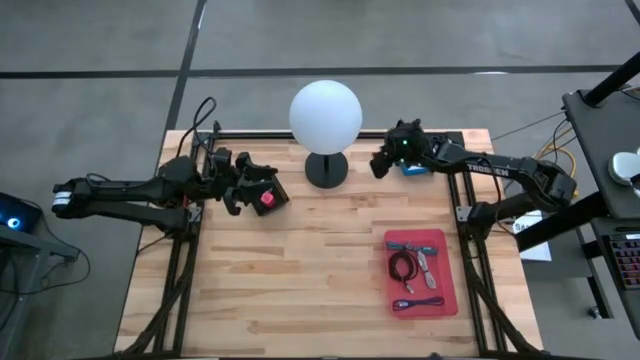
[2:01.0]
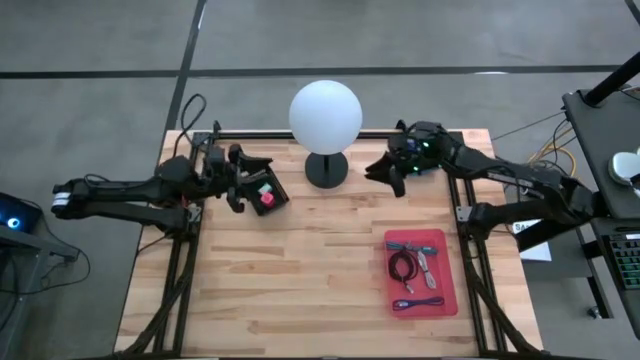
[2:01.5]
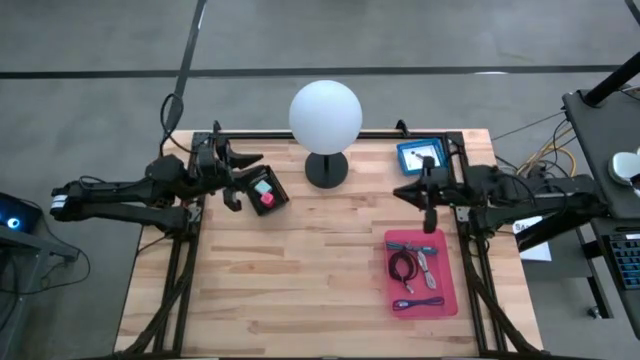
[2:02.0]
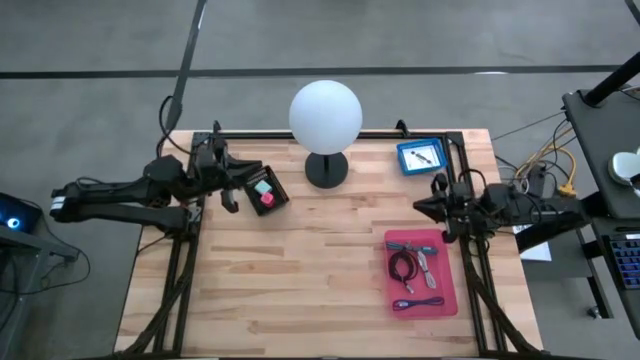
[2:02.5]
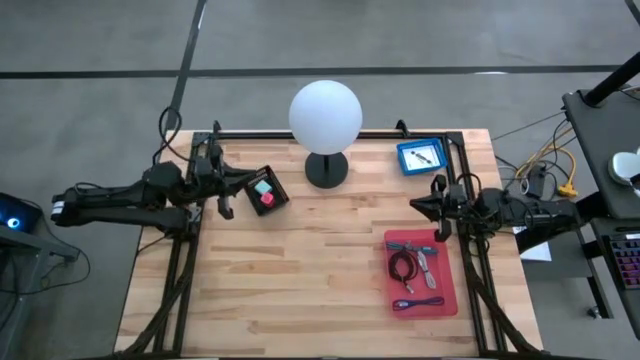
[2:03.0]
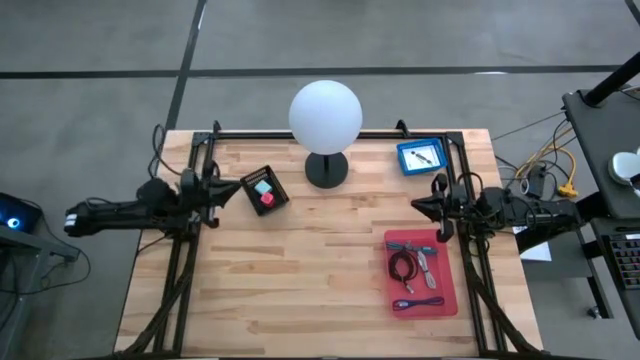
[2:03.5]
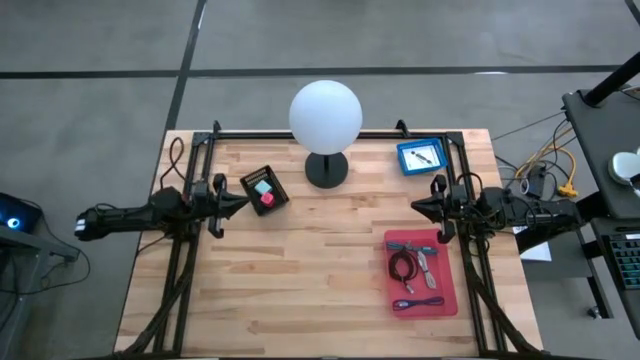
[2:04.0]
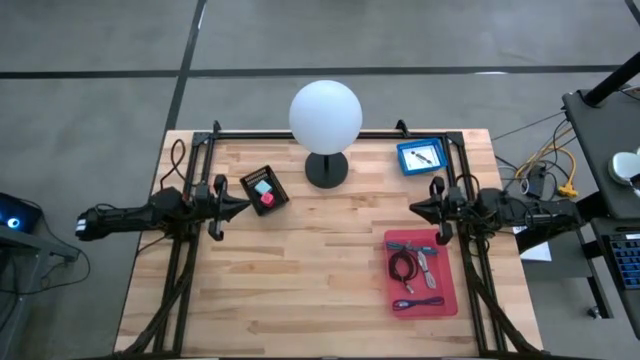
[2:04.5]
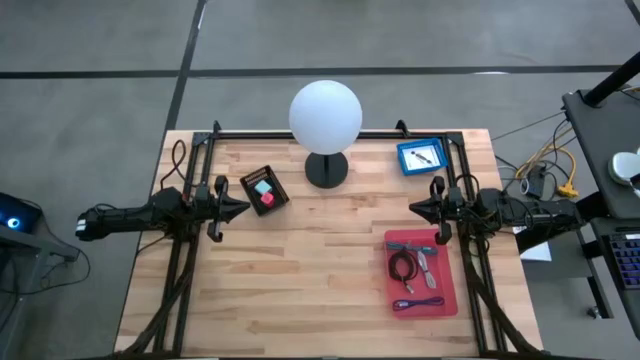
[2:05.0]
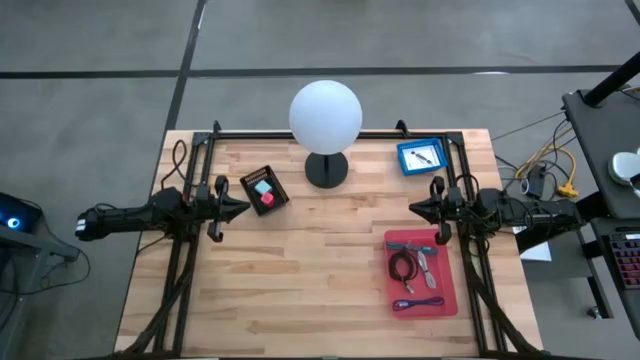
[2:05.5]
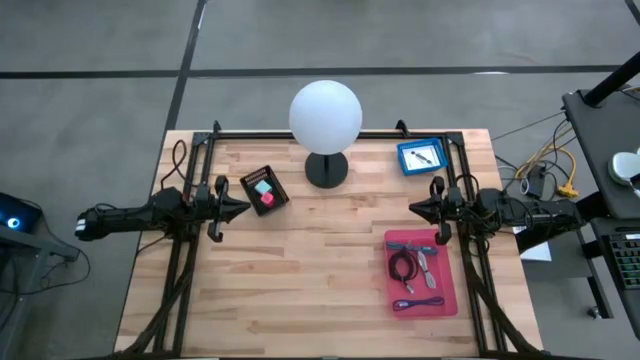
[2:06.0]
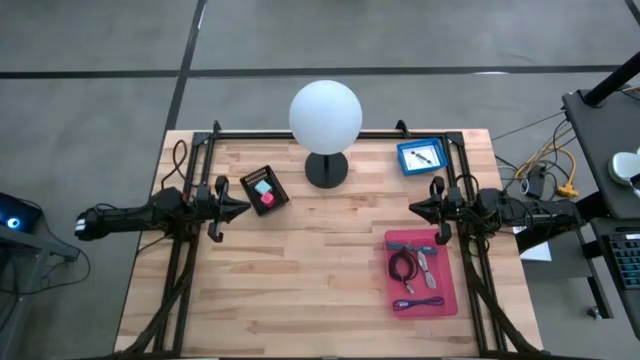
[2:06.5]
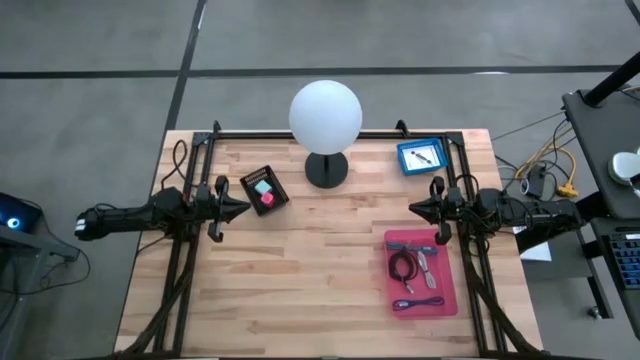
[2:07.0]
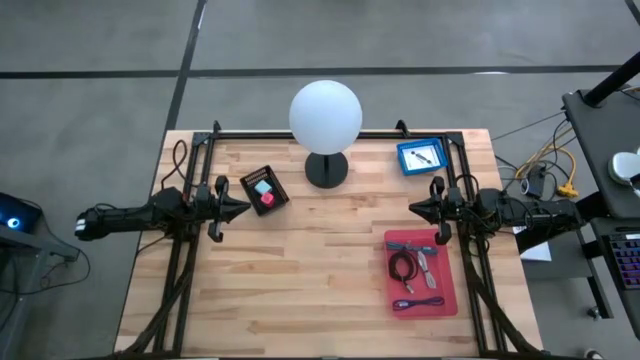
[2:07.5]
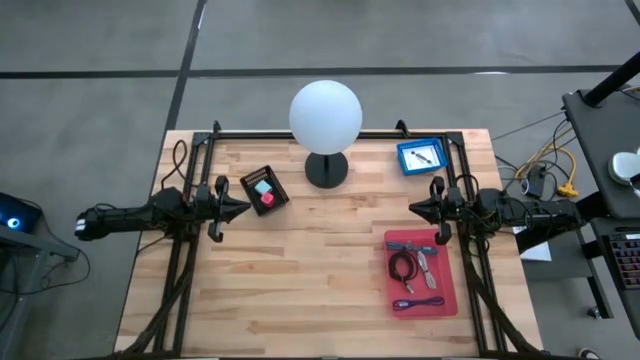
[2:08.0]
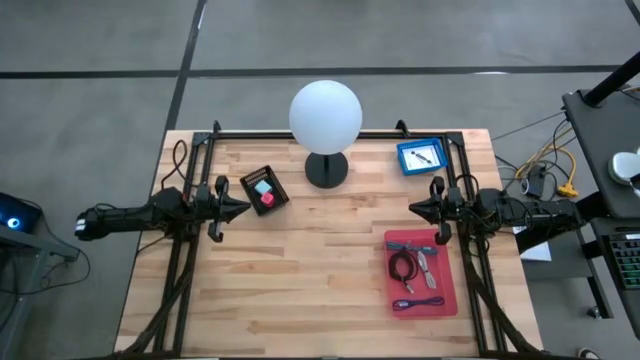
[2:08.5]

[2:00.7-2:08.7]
Task: Pick and place items into bin
Return to Home Position

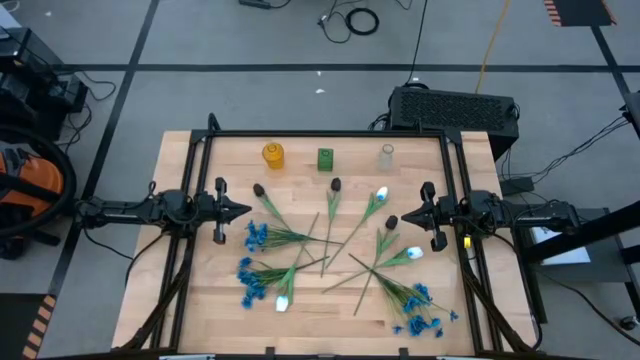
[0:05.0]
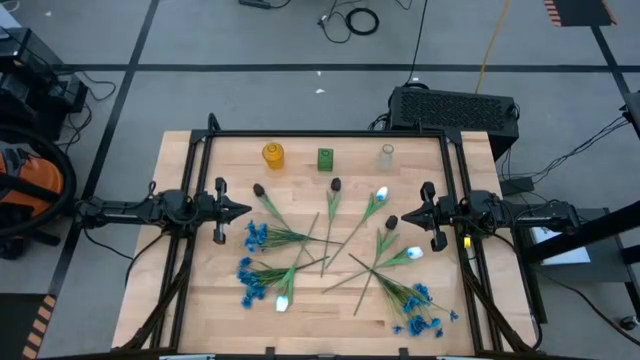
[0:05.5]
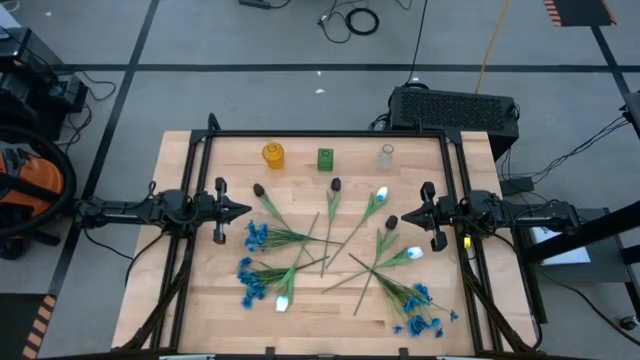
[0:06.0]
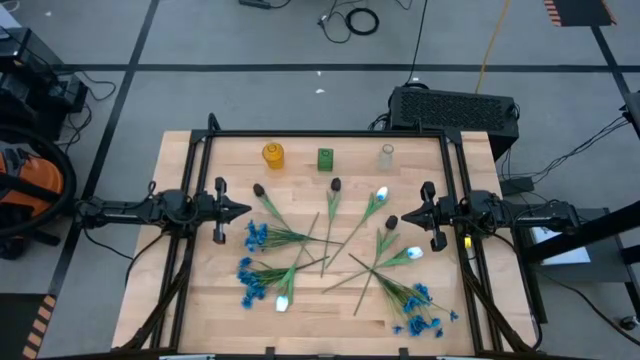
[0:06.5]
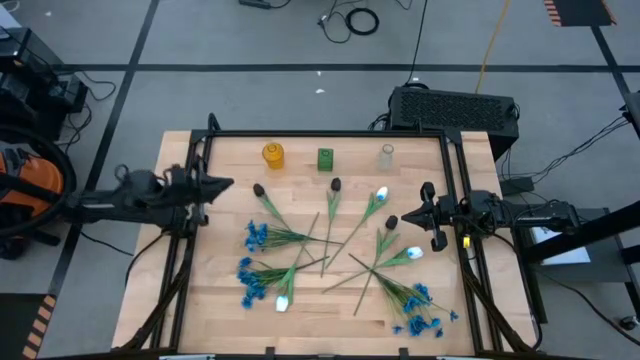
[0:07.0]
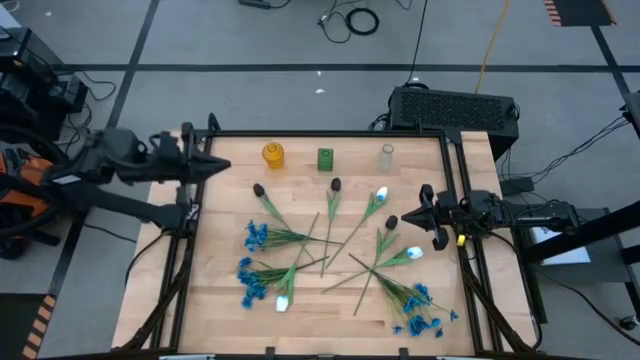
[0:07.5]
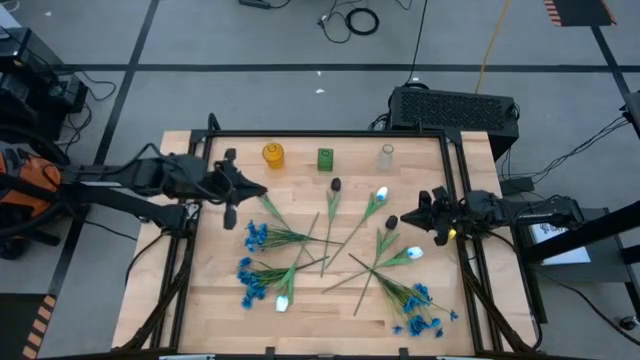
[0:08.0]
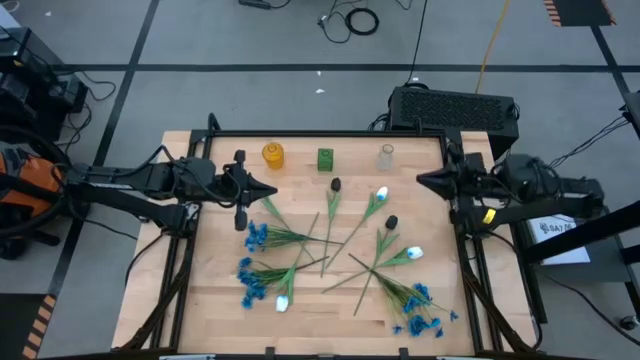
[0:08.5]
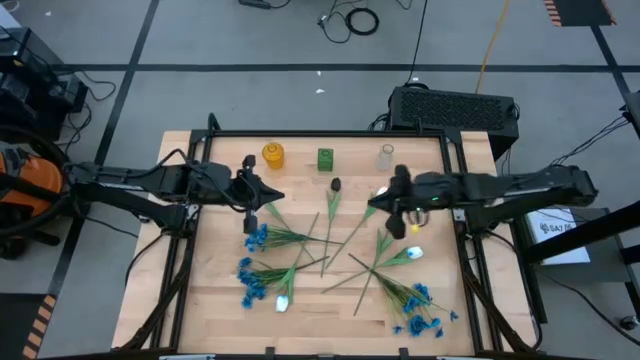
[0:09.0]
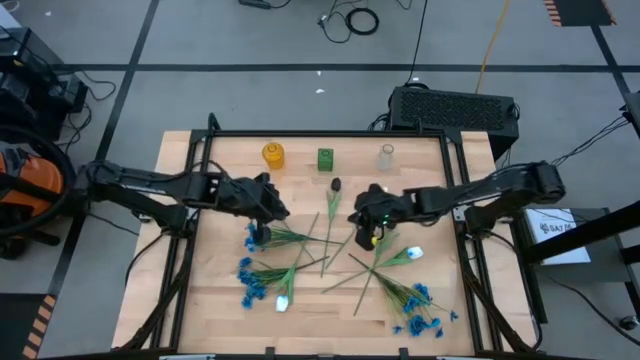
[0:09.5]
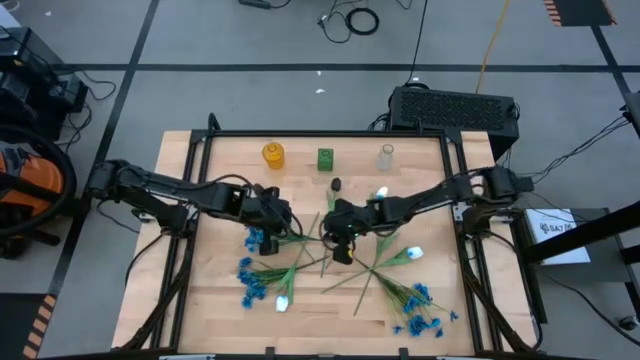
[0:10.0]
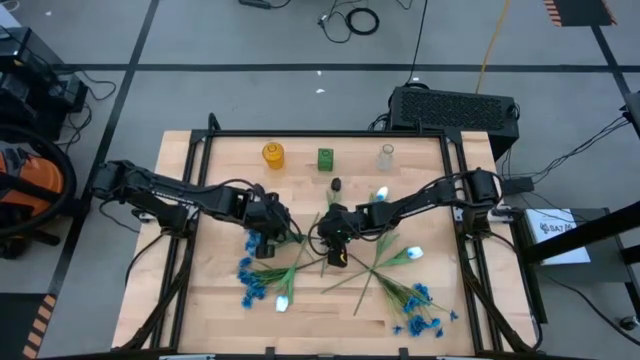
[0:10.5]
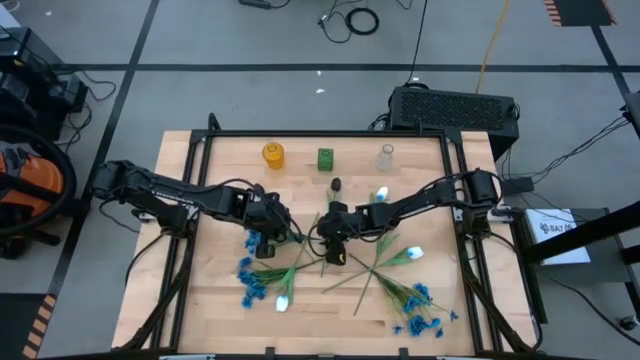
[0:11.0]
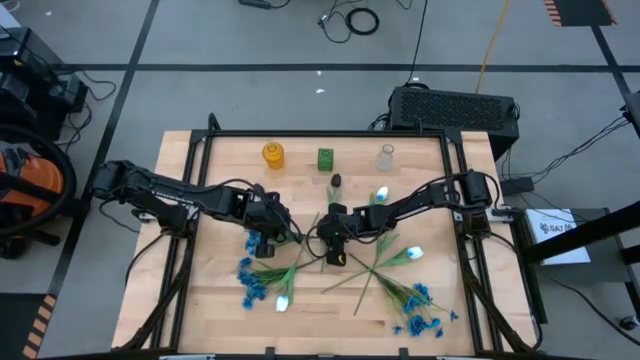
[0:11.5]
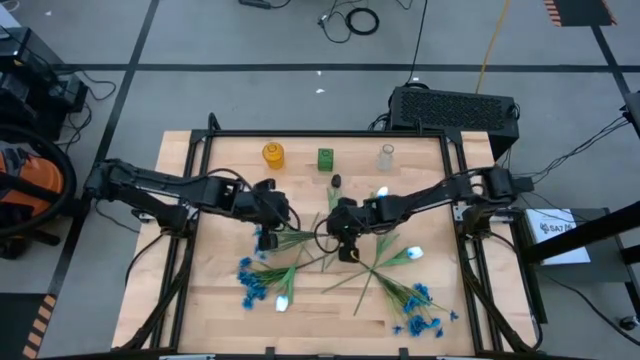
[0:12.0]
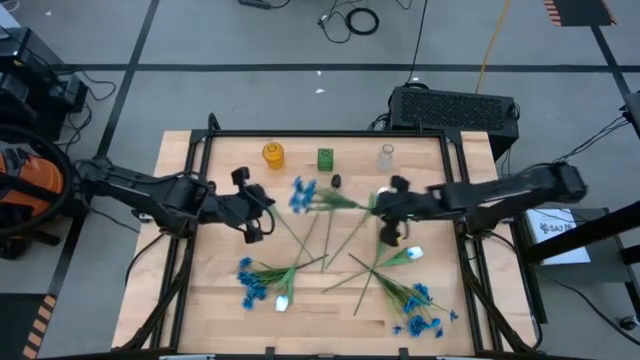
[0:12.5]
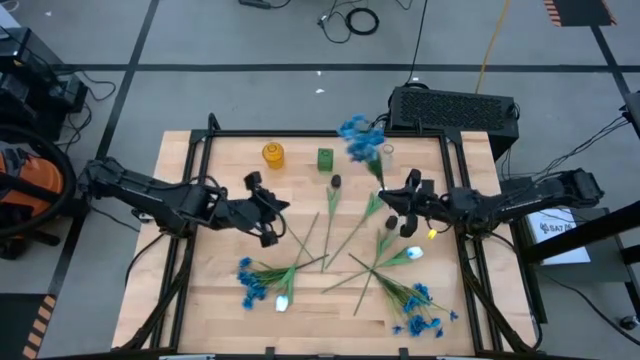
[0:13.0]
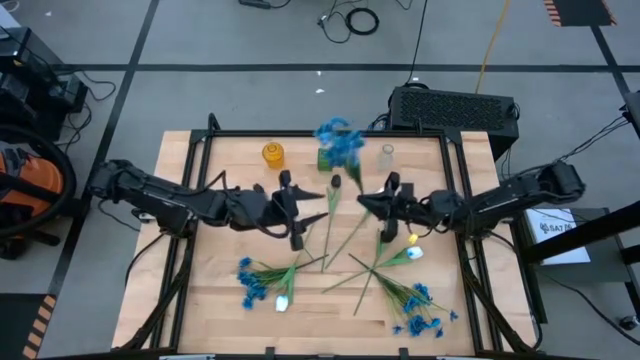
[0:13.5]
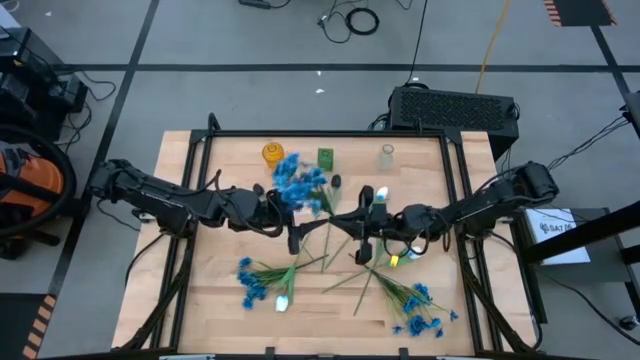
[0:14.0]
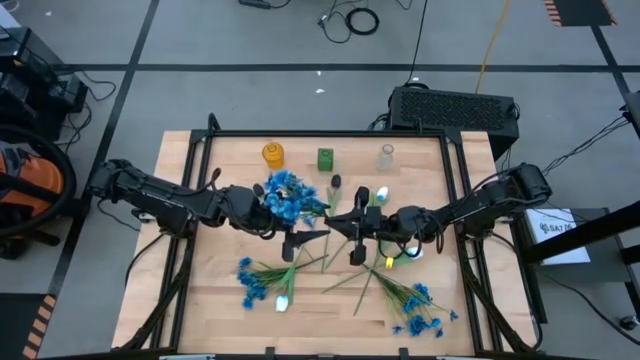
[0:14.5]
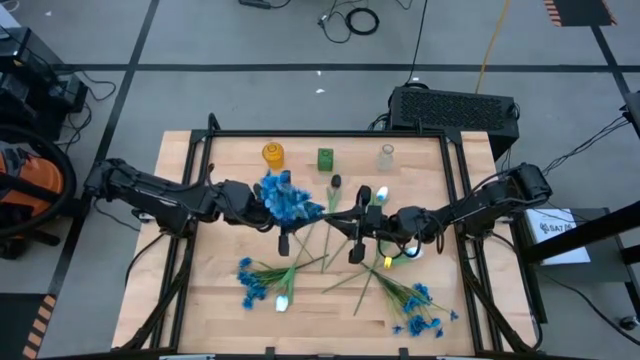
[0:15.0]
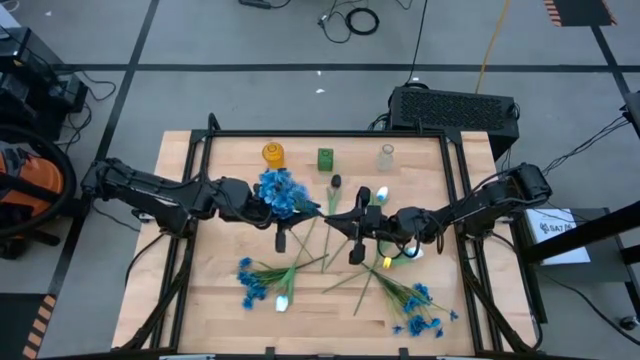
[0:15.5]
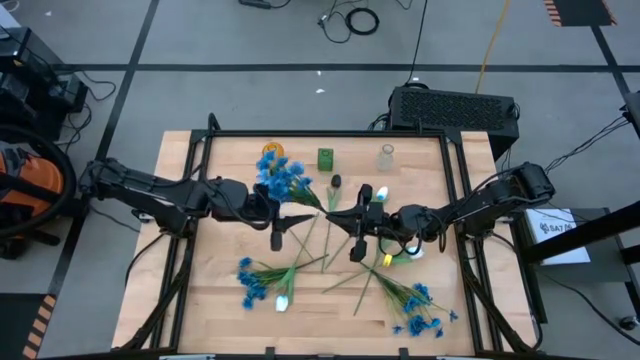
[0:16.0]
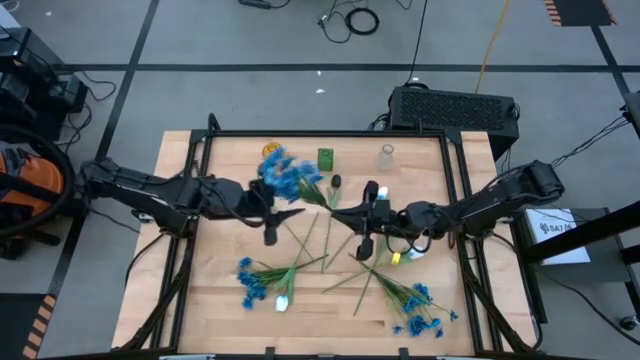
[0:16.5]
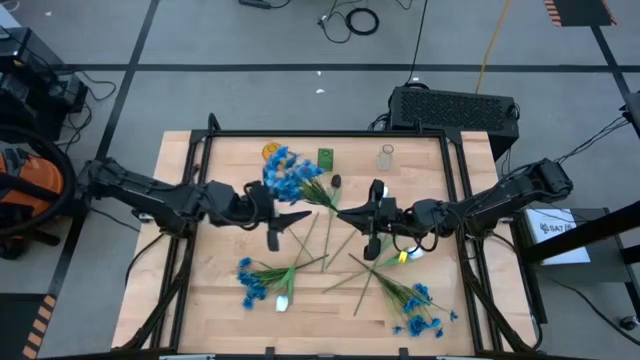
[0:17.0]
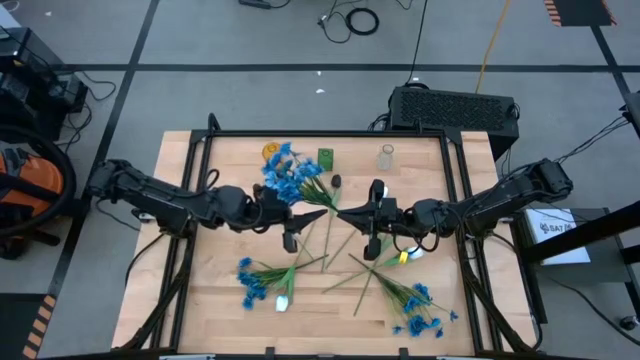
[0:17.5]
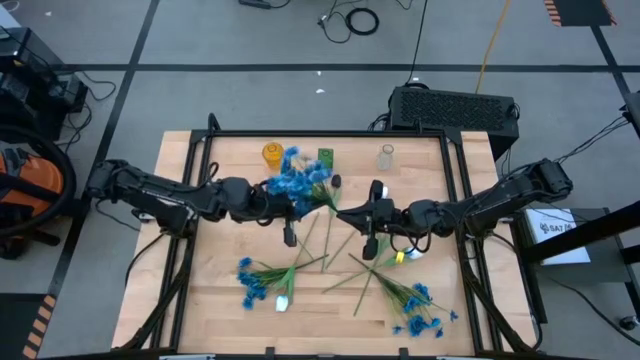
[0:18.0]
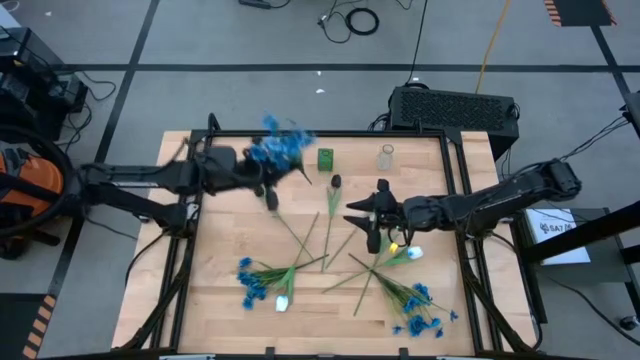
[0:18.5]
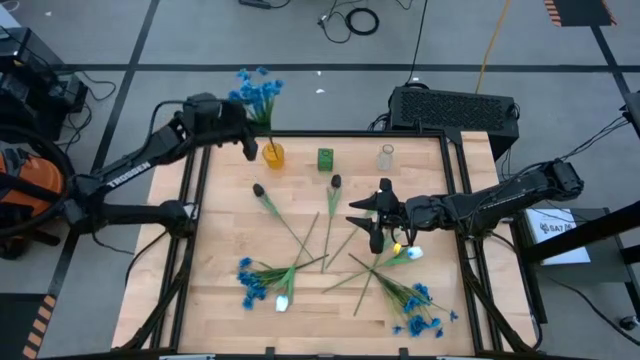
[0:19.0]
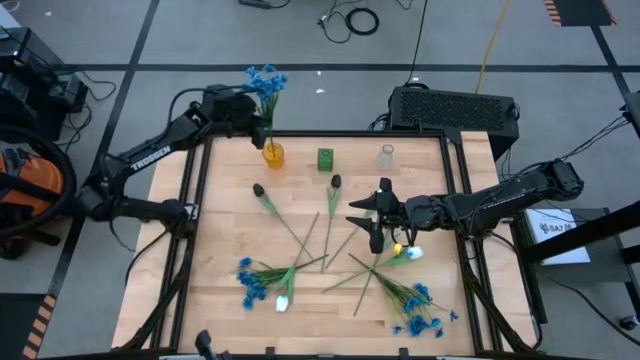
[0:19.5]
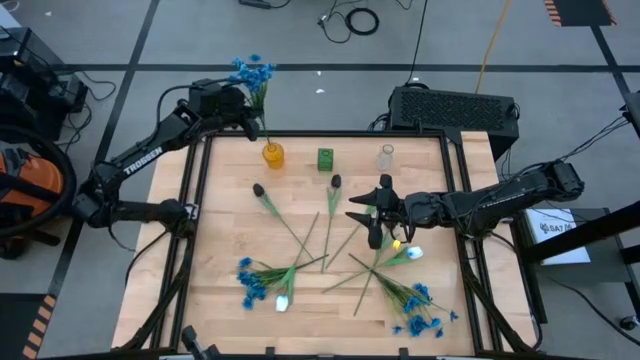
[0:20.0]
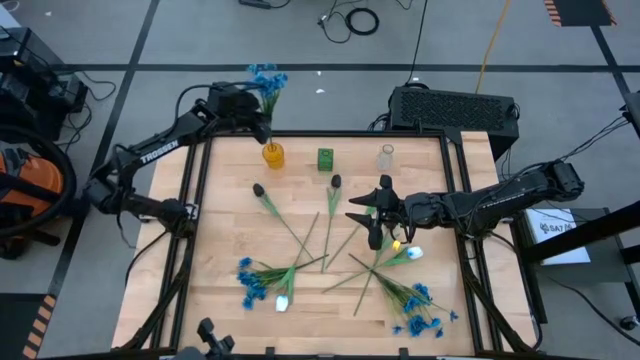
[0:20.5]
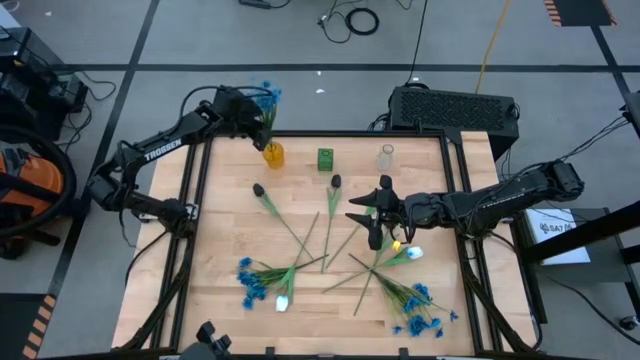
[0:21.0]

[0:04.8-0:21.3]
Task: Sort flowers into vase by color
Put the top blue flowers into the yellow vase
